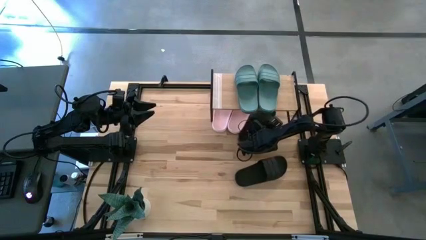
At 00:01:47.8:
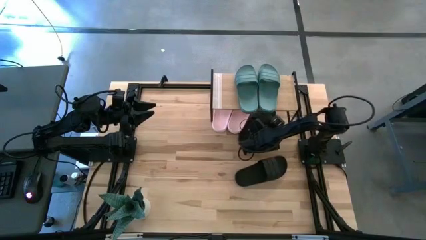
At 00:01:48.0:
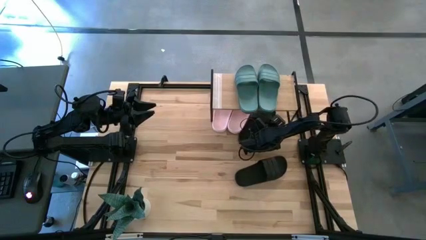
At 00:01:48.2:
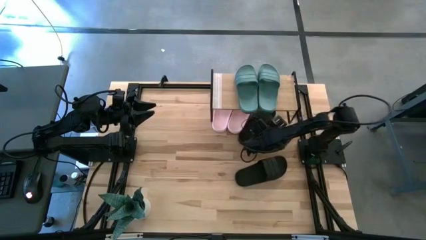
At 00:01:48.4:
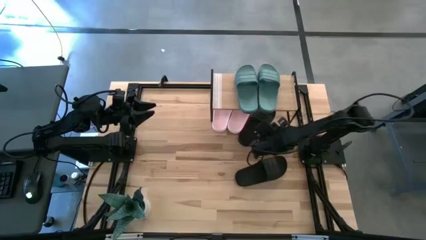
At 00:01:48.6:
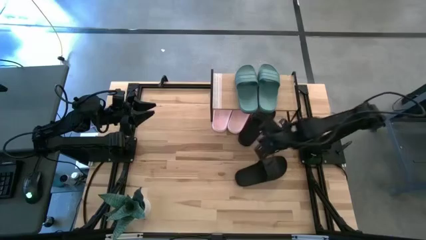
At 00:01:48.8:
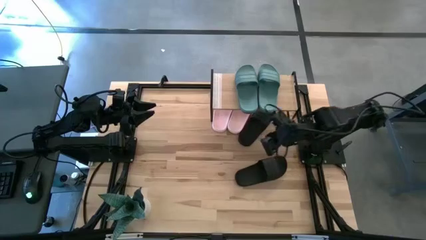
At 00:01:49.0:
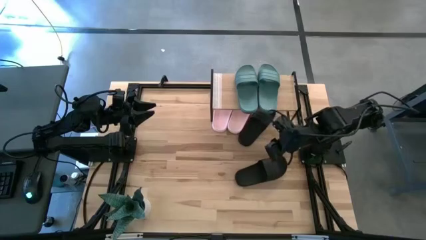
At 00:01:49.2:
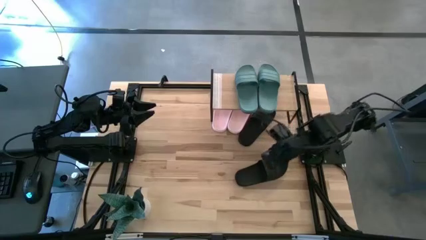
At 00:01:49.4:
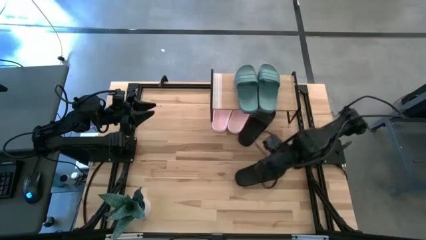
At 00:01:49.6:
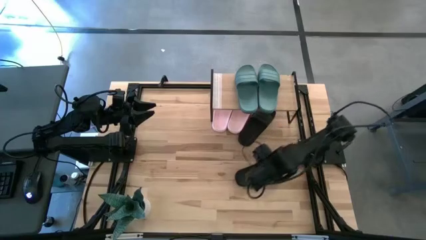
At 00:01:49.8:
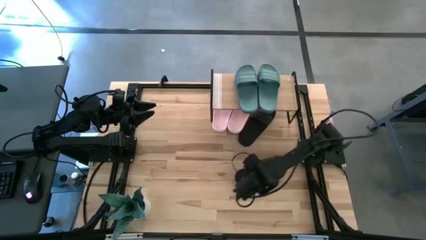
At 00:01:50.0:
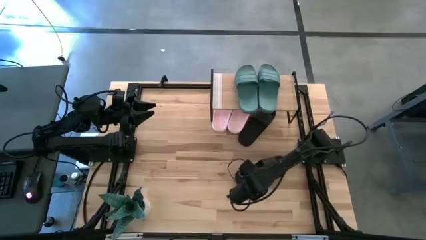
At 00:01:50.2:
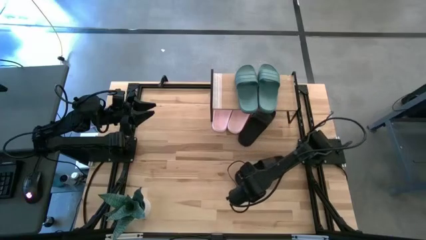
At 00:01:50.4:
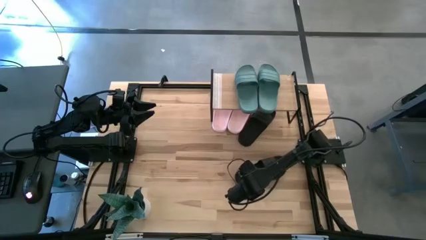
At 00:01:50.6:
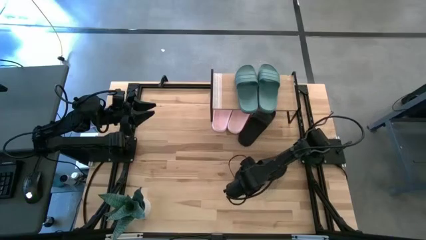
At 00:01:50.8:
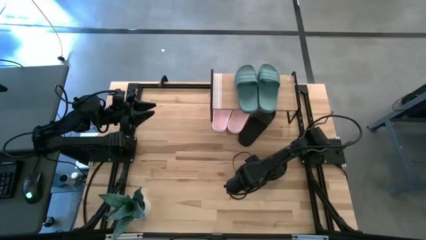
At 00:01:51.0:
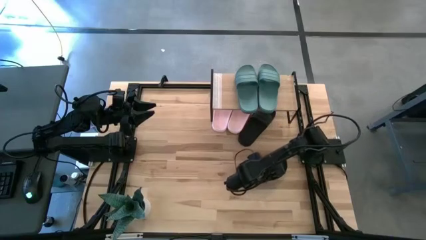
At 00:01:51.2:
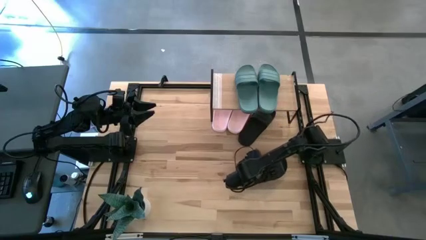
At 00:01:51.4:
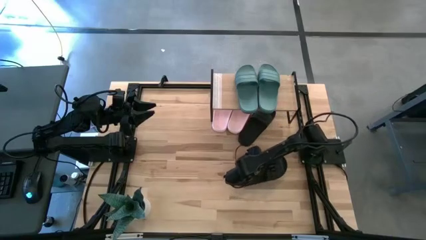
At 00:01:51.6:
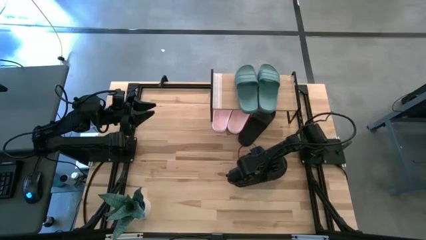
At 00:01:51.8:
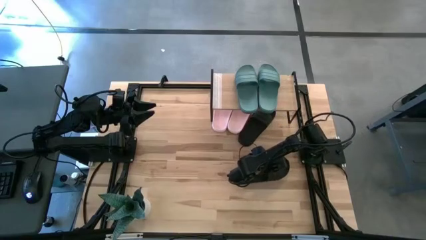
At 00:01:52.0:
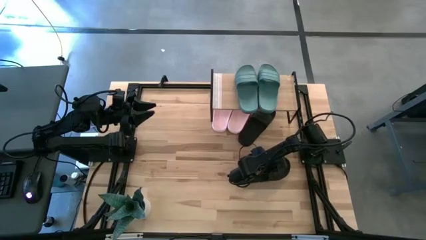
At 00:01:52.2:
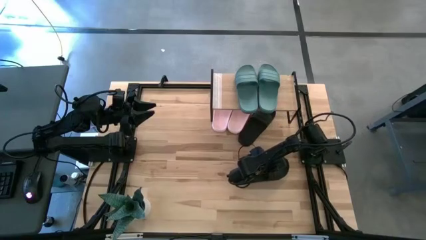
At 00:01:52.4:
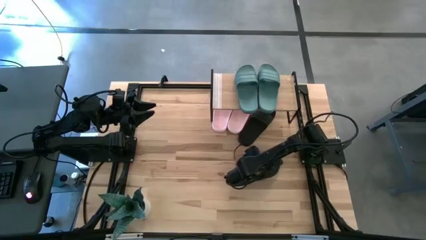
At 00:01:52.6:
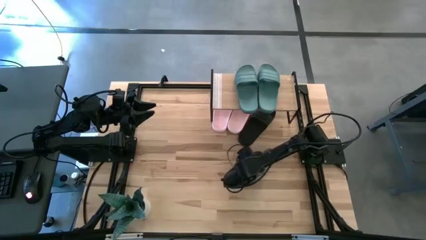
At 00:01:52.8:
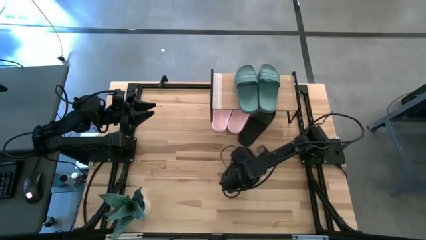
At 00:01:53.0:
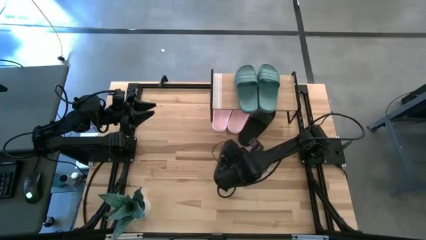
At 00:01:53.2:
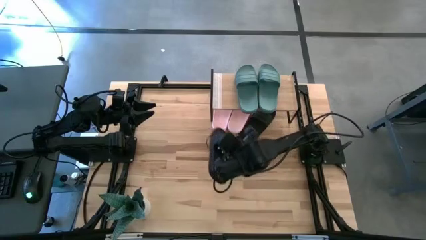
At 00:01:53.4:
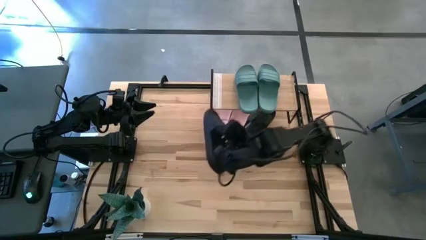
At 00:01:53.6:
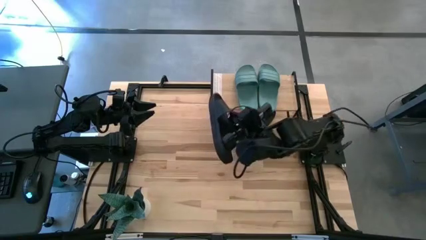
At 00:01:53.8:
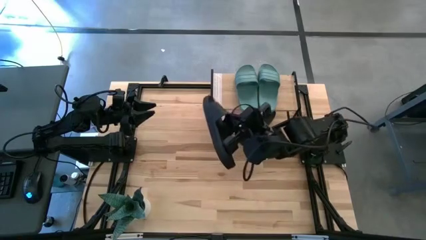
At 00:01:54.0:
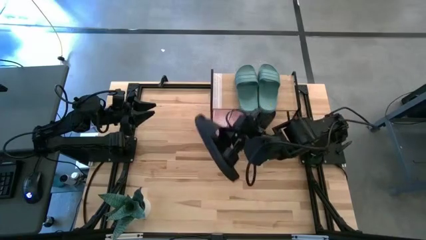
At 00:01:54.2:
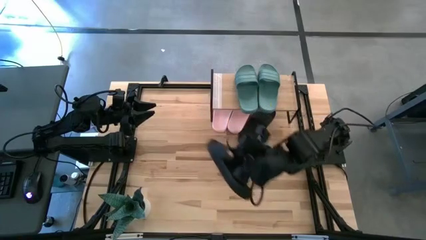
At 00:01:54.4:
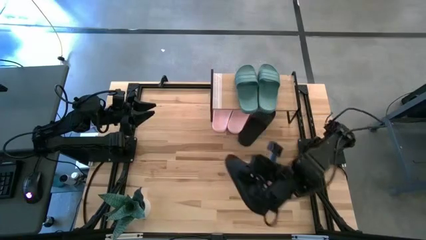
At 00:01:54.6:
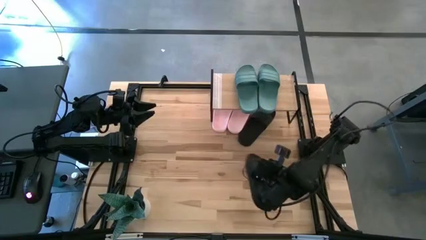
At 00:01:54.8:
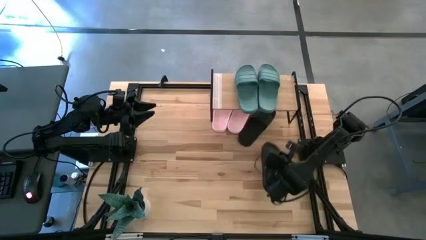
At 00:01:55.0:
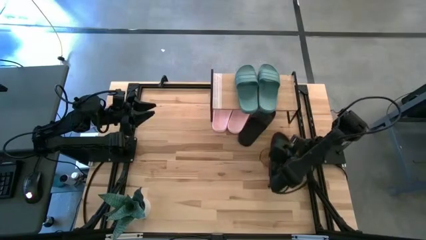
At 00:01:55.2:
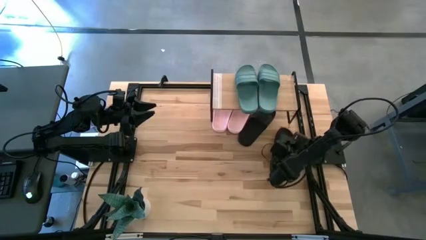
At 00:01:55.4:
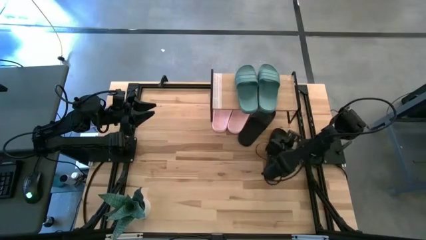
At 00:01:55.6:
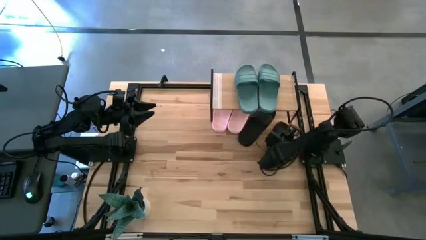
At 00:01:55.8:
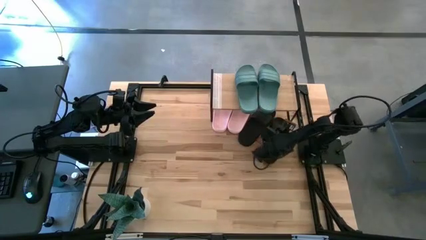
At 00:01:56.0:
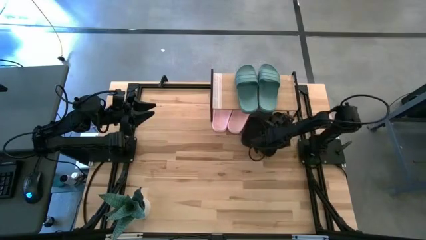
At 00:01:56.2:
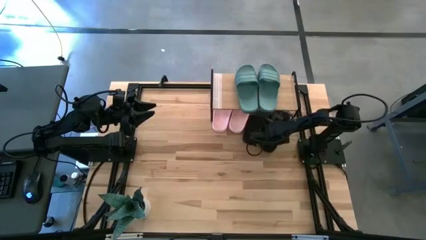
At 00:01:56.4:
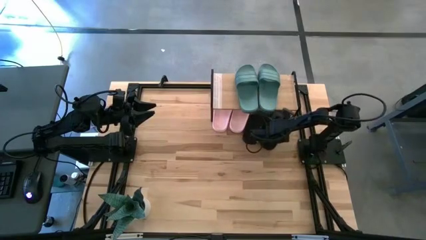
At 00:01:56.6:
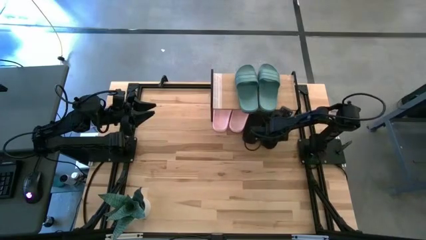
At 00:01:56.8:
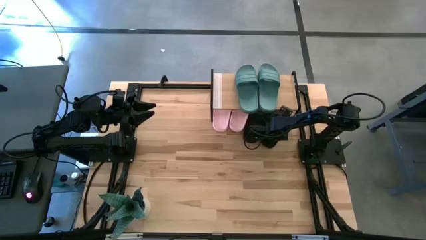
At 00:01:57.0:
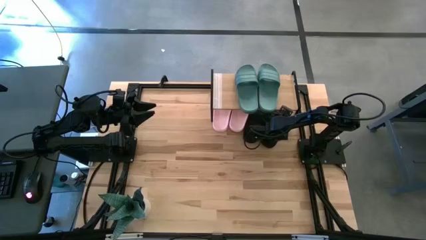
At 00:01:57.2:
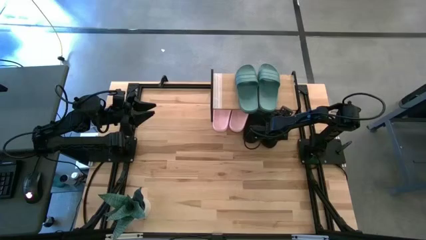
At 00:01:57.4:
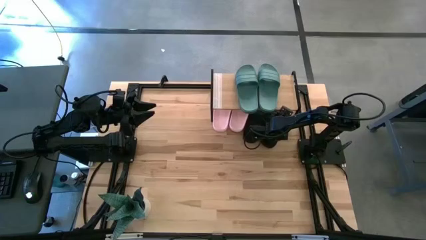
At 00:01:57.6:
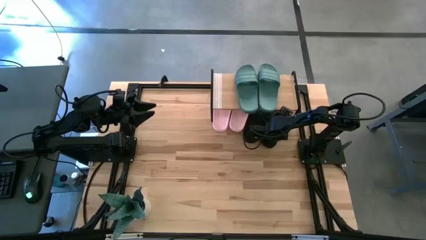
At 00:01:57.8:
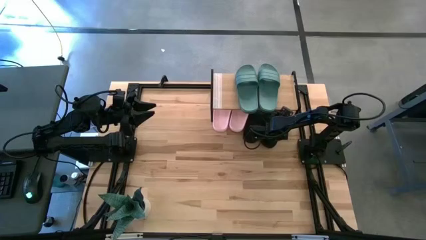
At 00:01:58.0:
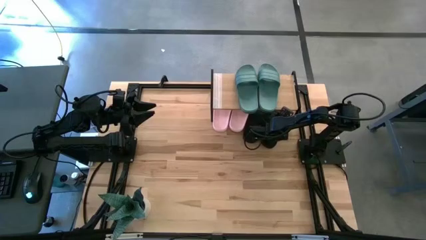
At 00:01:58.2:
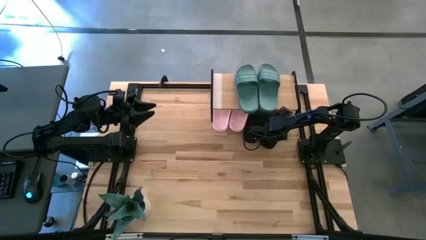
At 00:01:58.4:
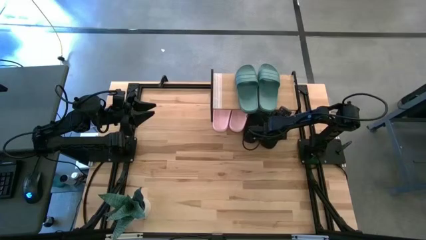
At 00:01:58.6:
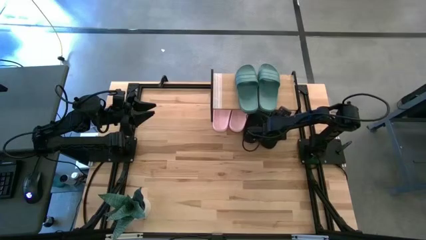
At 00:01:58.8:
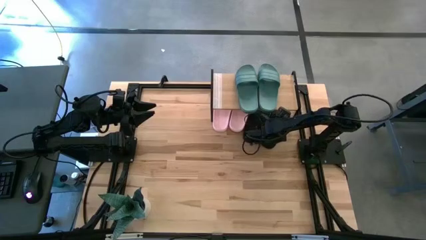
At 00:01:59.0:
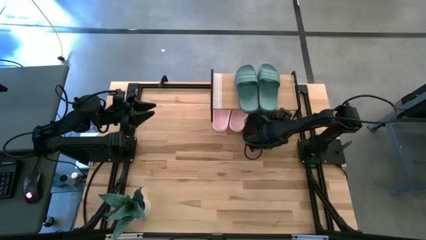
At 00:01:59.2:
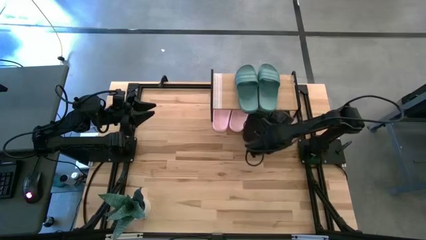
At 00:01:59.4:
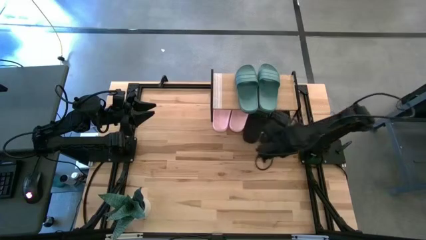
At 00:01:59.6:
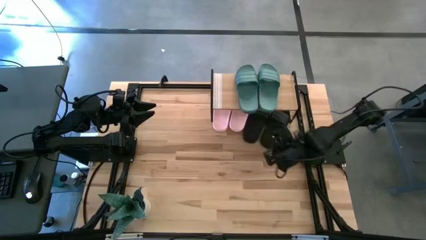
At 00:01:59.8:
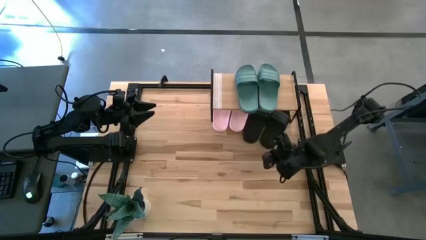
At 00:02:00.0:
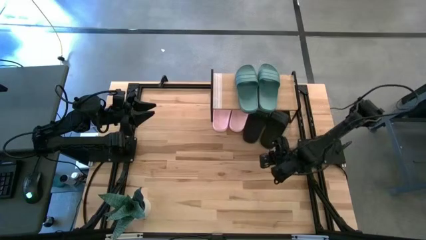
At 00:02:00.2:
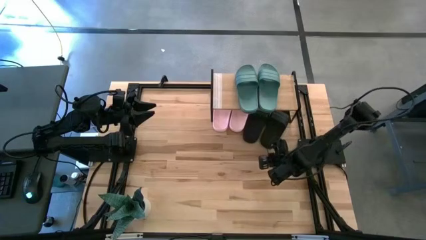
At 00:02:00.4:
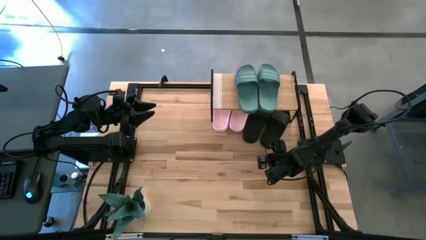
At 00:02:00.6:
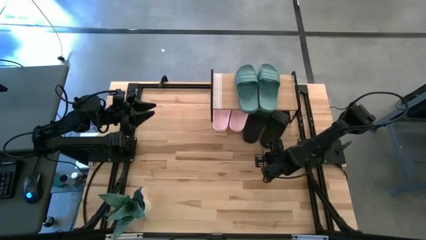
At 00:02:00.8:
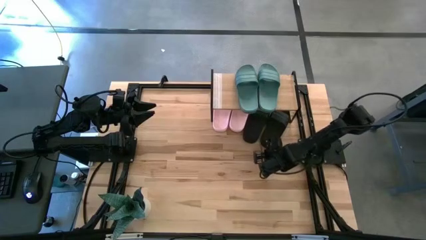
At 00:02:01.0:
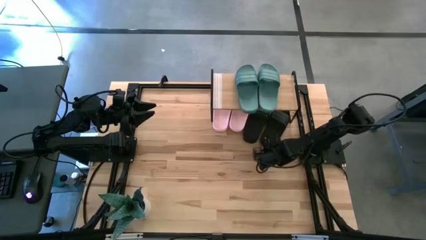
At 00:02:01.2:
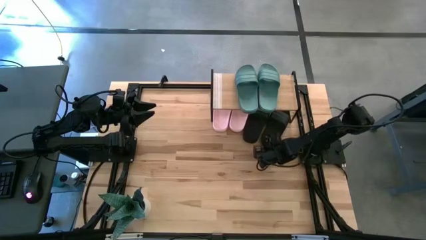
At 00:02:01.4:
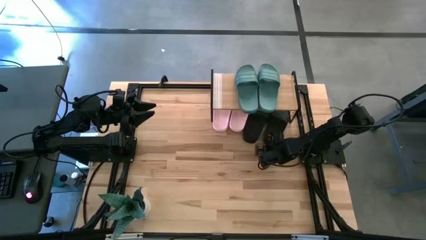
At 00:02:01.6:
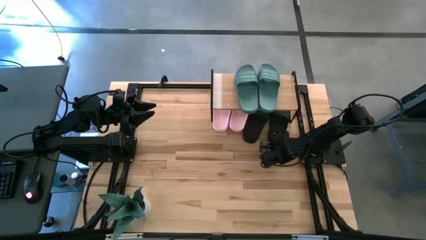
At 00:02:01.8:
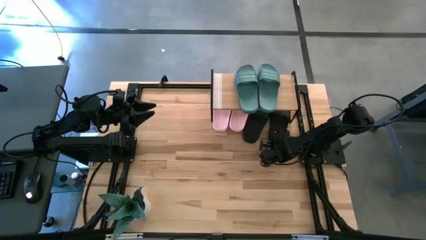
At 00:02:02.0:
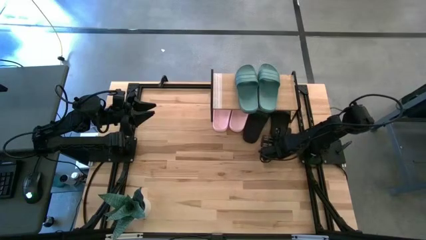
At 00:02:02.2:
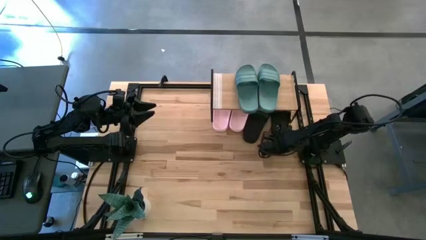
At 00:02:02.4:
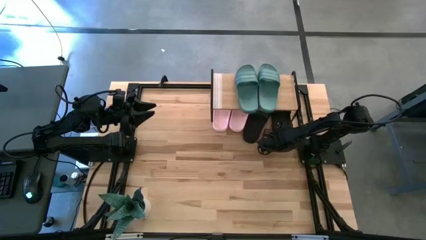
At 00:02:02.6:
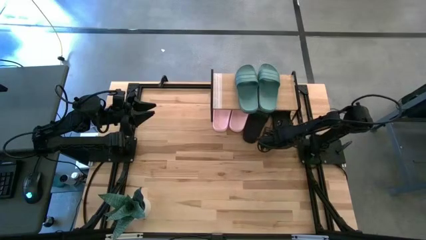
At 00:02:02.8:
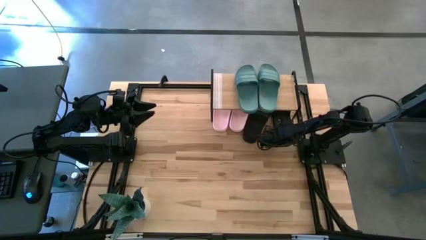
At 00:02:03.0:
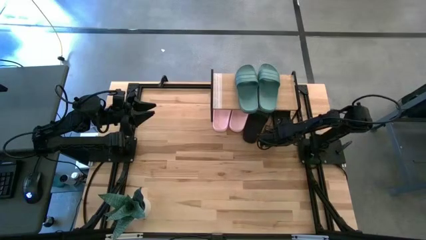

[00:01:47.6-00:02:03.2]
Task: Pick and place slides into the shelf
Put the black slide under the shelf
